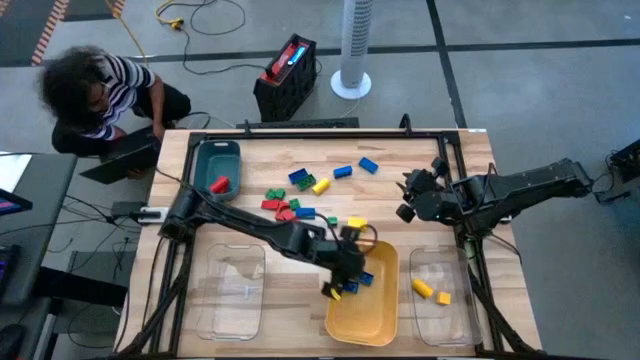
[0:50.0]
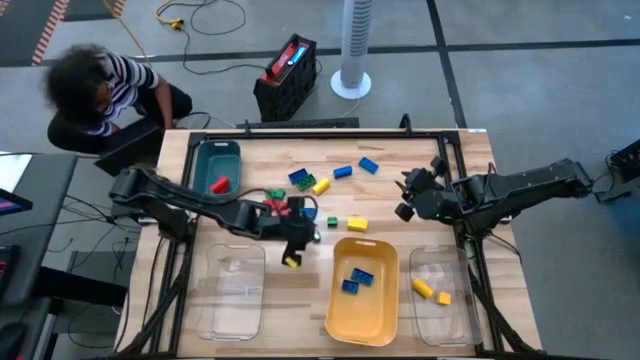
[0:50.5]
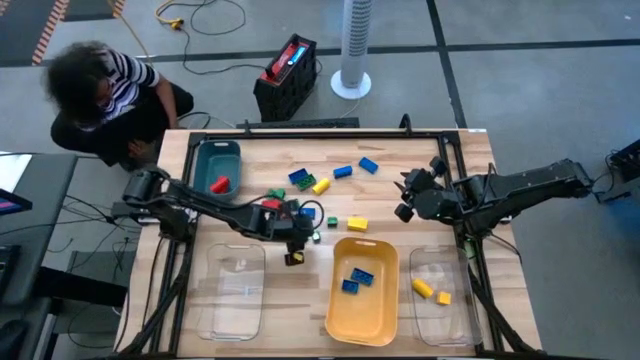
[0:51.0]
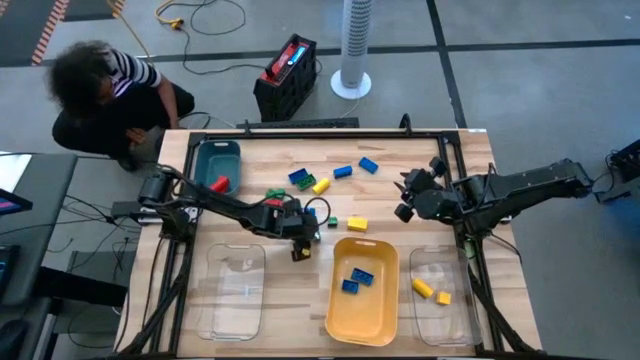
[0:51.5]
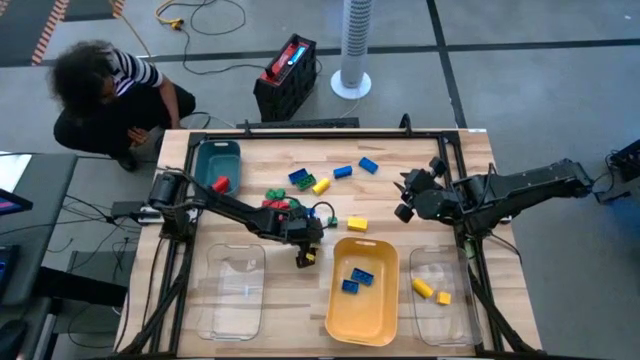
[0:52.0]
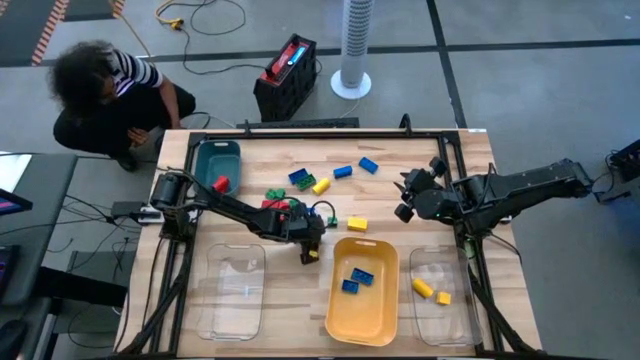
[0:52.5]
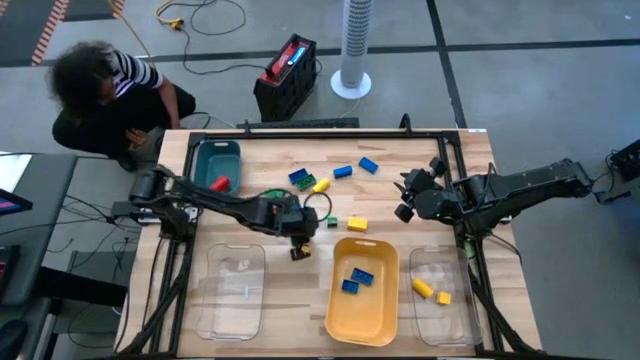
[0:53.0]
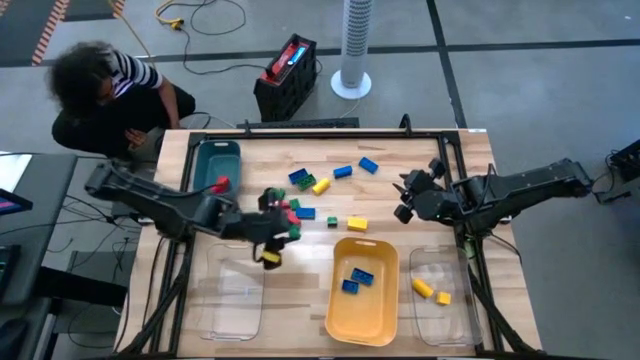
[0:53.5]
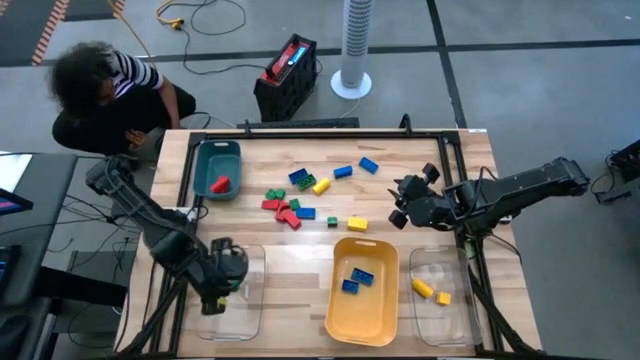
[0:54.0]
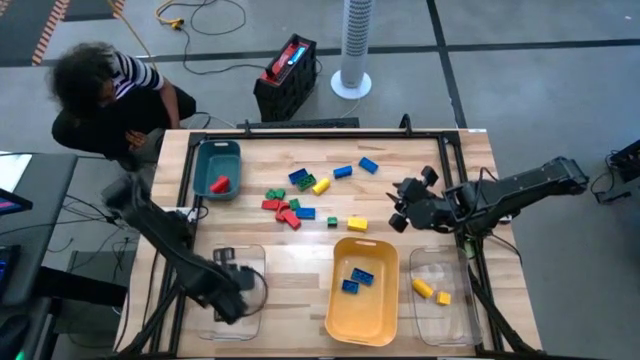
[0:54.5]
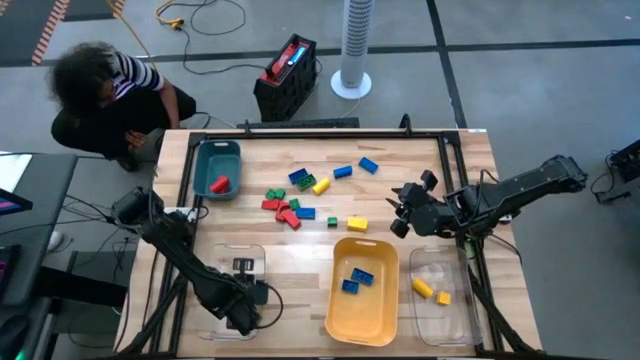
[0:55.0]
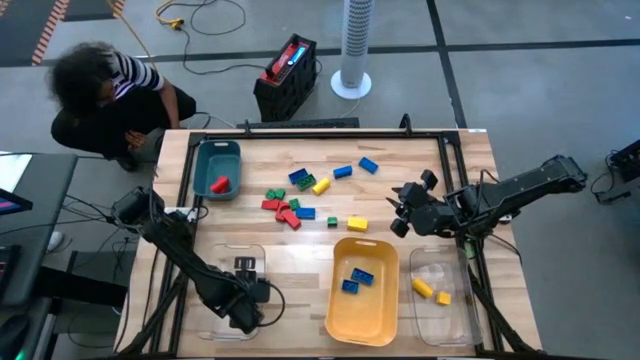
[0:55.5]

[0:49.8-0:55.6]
Task: Sort blocks
Put the green game piece into the left transparent bin

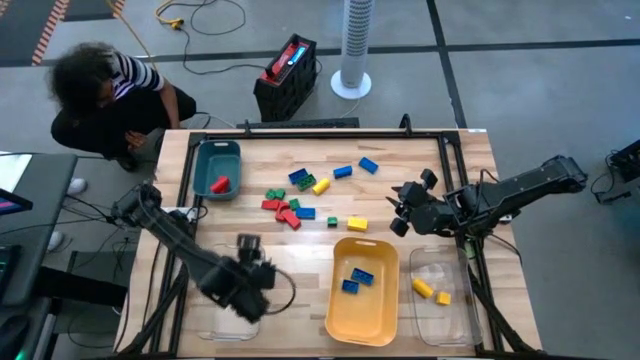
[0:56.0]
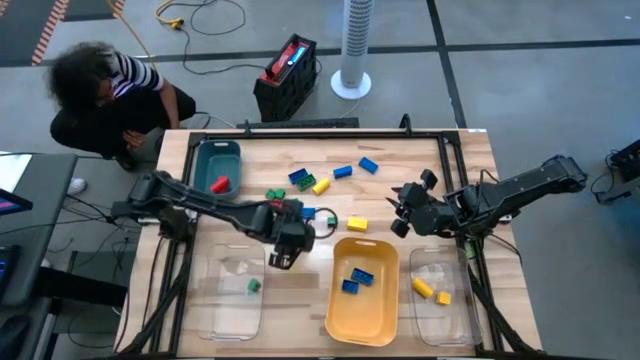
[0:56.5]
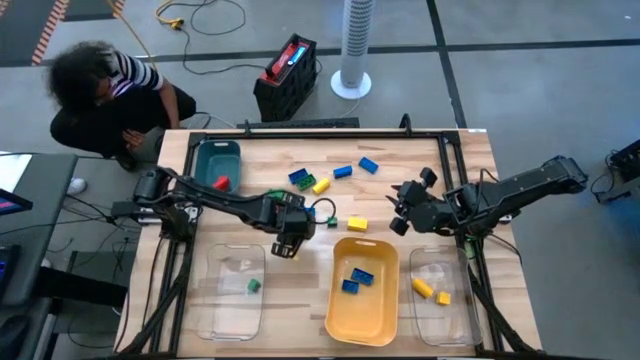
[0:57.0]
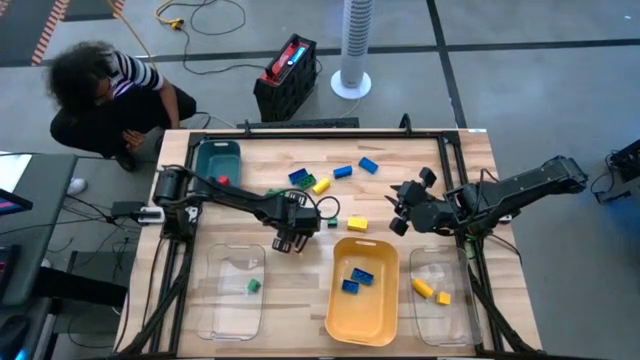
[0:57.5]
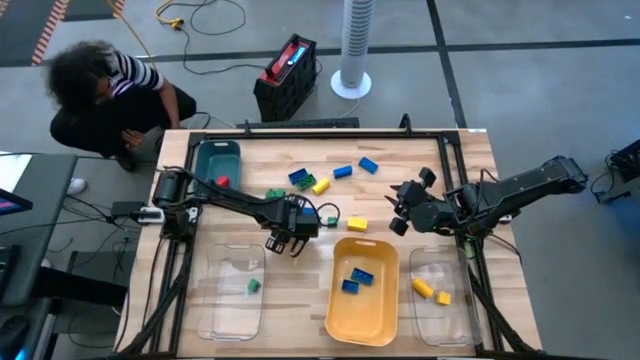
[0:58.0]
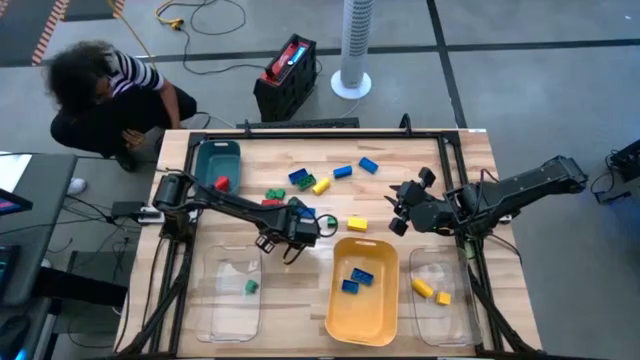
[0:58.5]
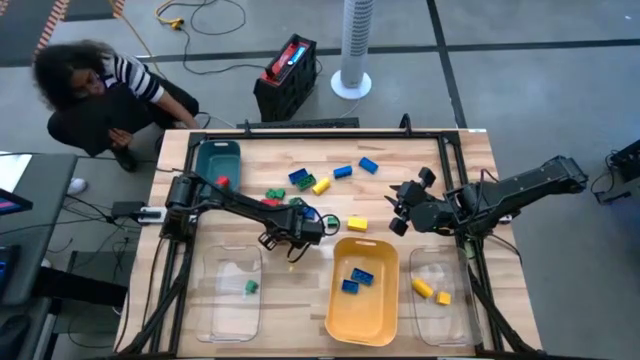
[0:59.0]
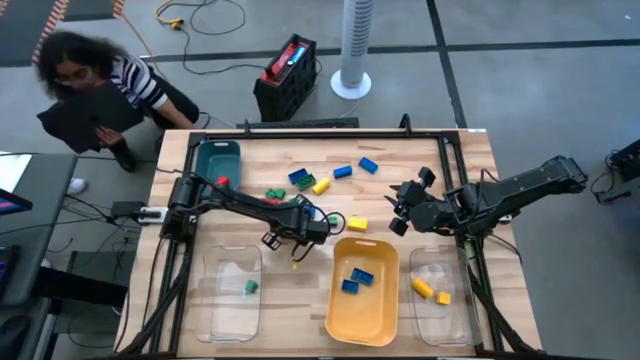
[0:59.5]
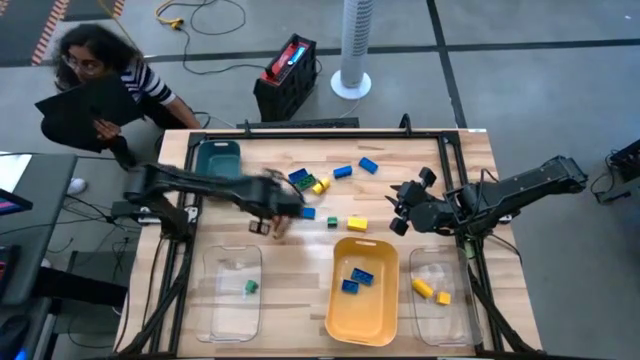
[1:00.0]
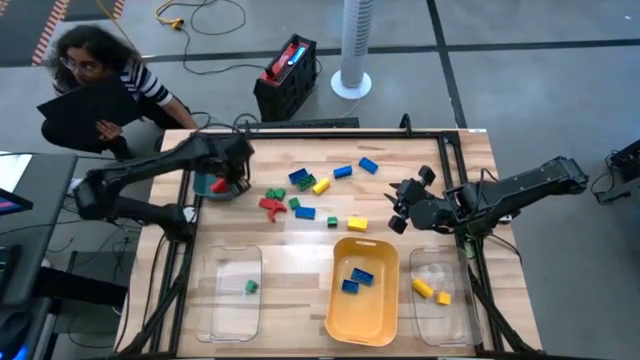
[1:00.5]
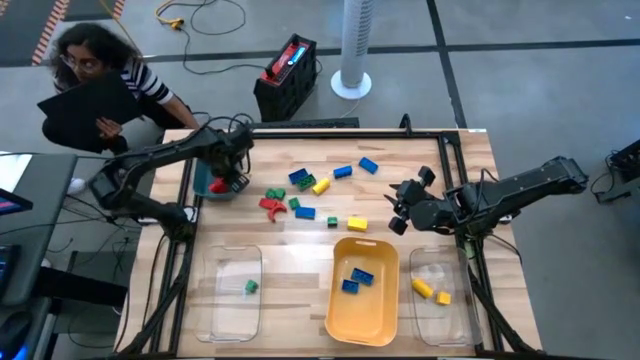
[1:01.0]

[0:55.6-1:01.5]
Put the red wooden block into the green bin

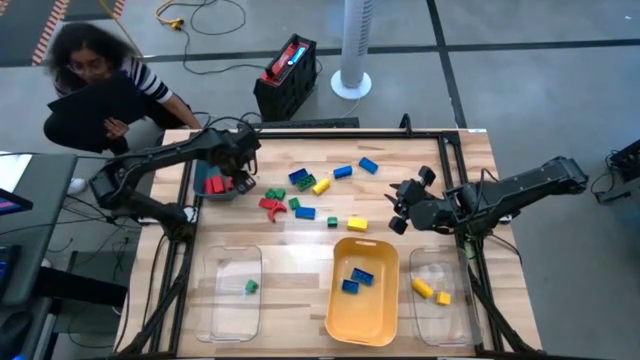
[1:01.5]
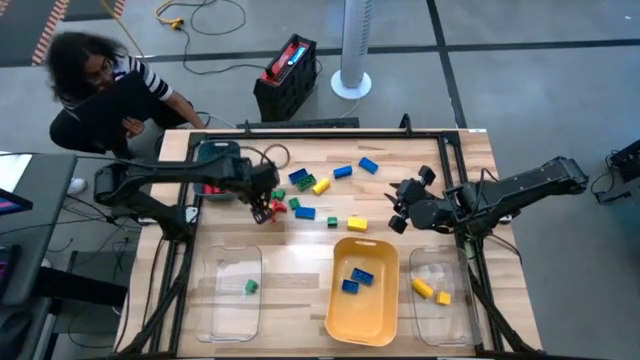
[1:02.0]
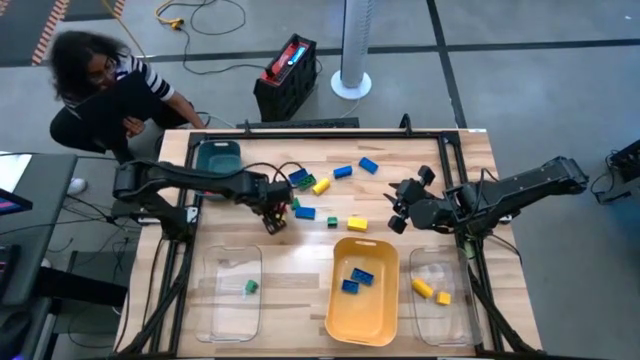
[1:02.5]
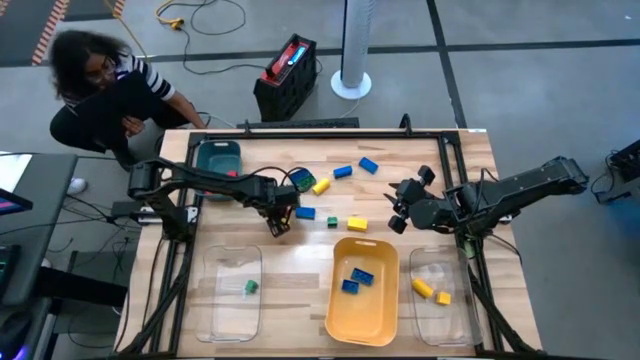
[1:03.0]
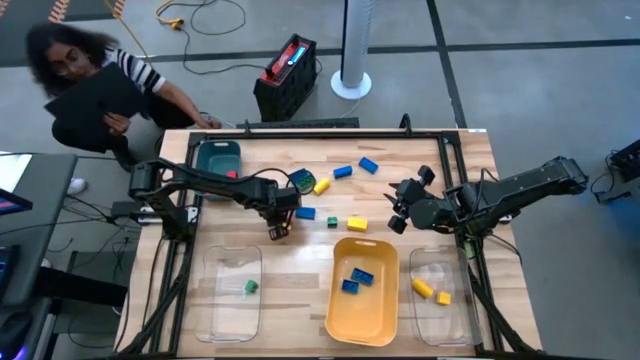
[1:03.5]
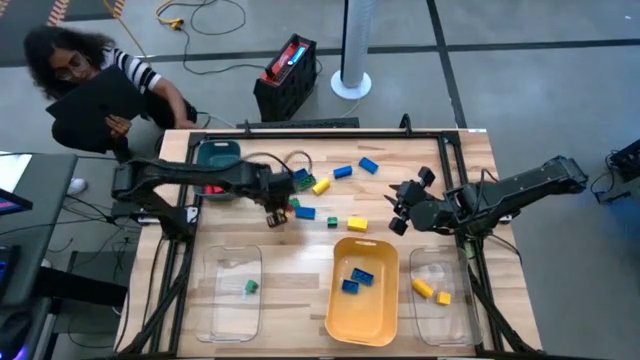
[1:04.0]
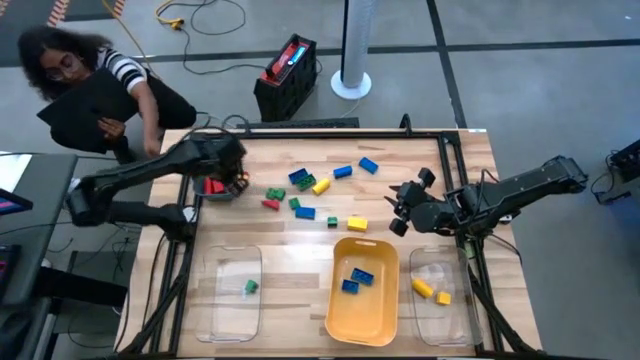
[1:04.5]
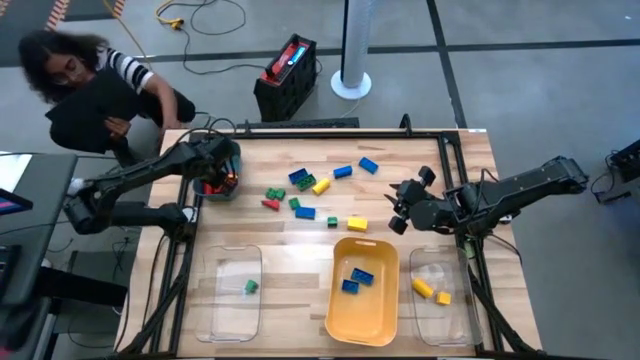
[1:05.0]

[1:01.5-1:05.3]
Put the red wooden block into the green bin

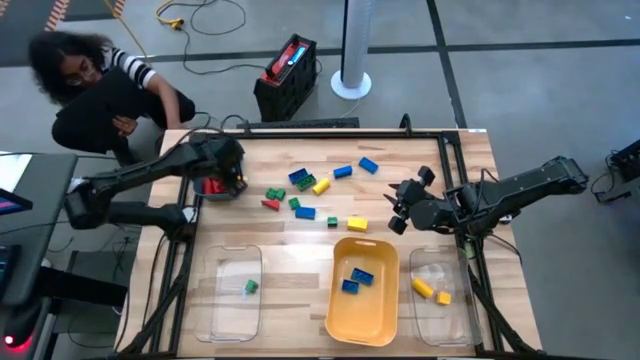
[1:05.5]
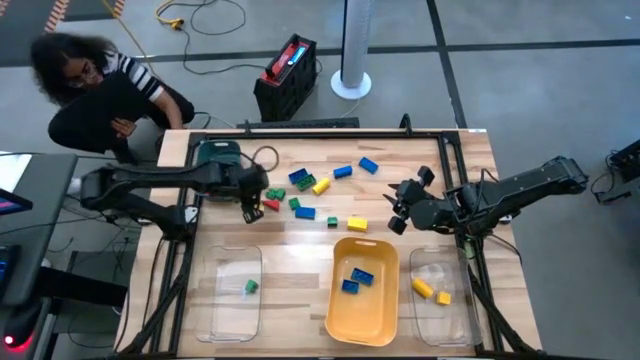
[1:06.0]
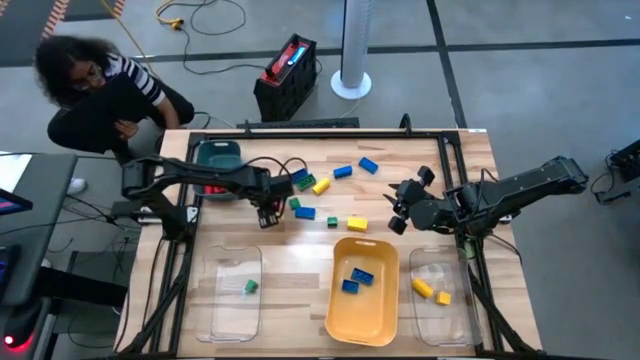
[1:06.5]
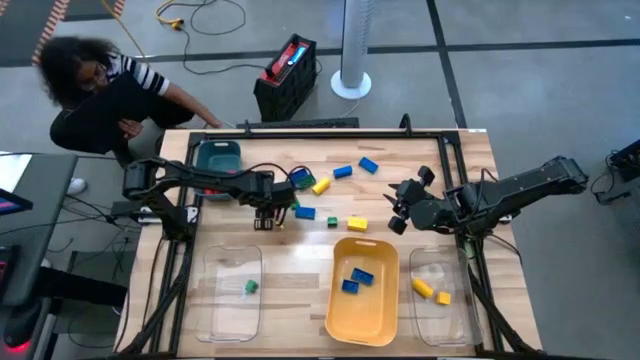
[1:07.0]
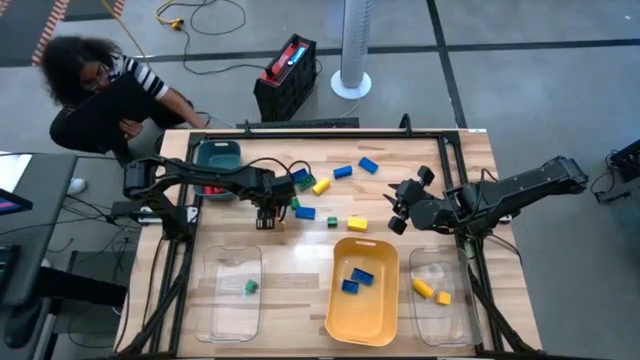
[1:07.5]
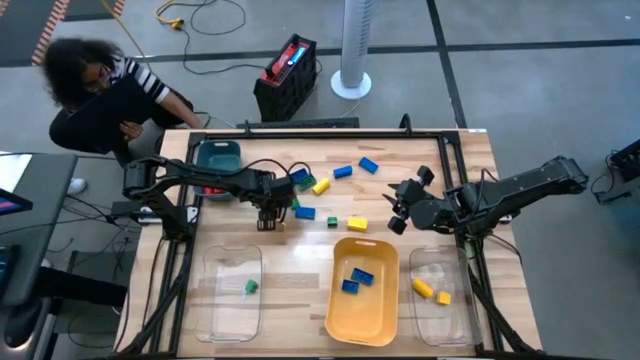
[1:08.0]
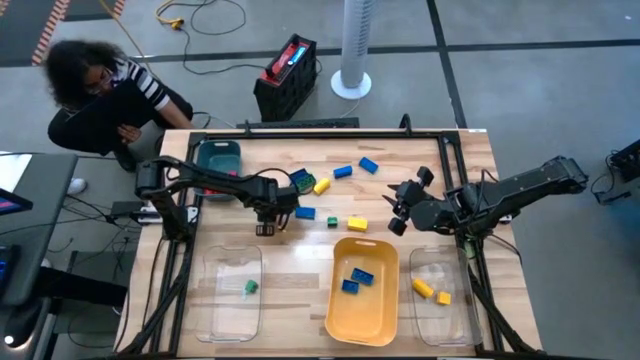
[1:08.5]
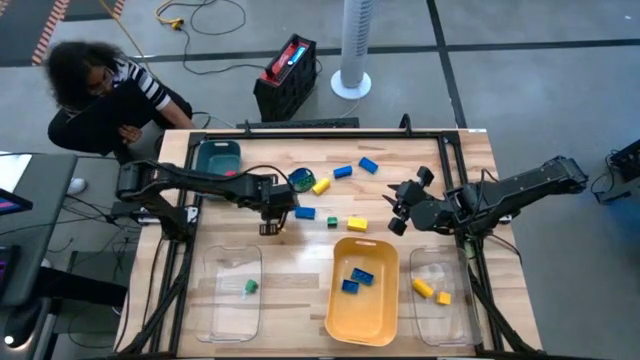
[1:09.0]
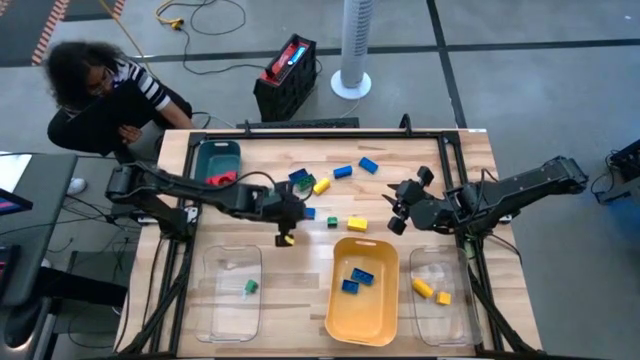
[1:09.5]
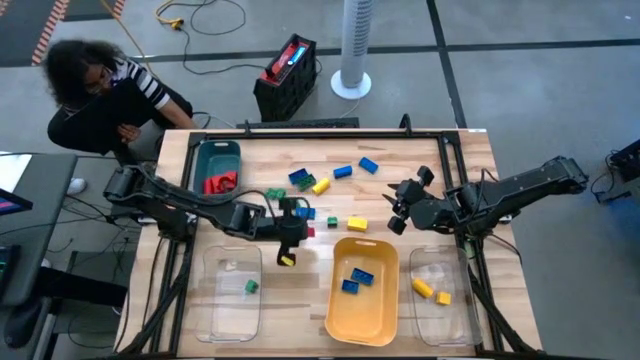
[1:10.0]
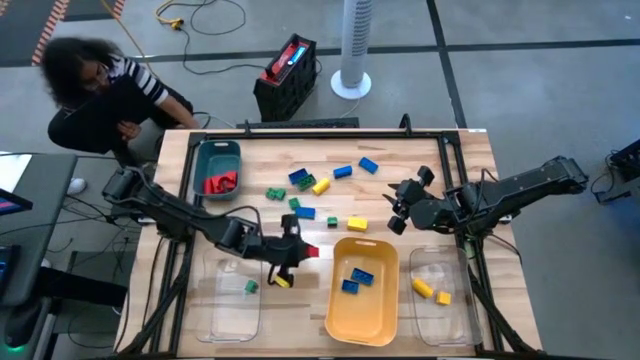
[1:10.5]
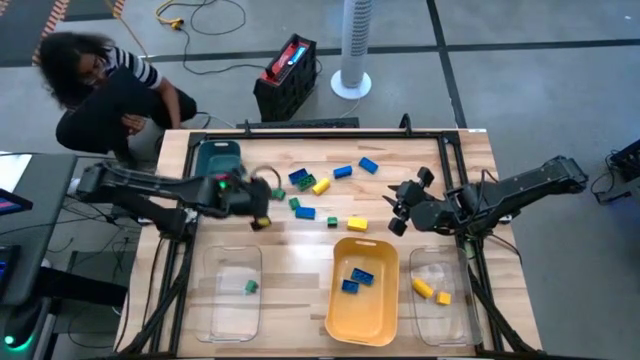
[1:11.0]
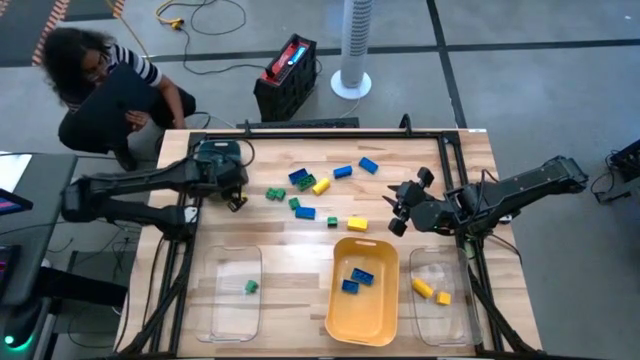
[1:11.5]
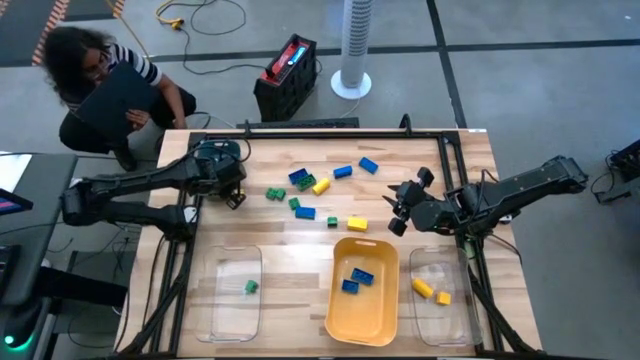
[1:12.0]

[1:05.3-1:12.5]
Put the red wooden block into the green bin
